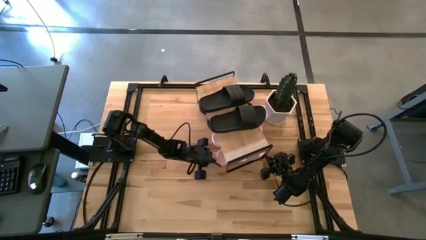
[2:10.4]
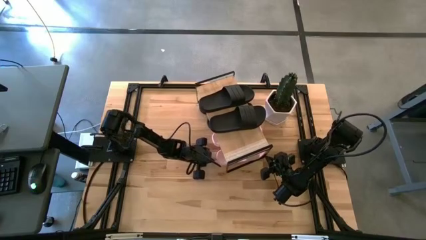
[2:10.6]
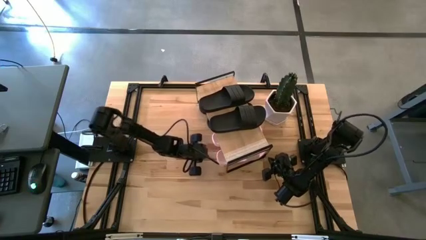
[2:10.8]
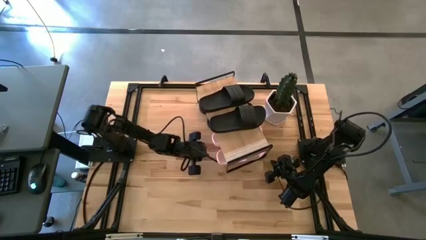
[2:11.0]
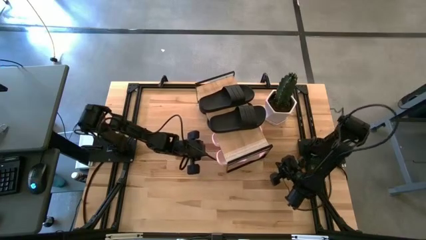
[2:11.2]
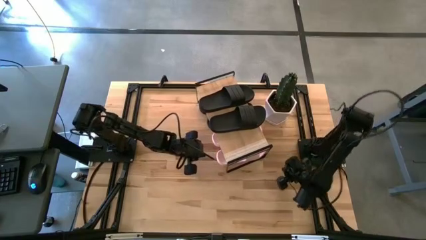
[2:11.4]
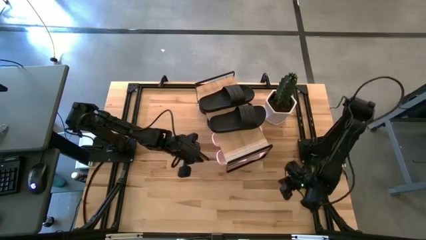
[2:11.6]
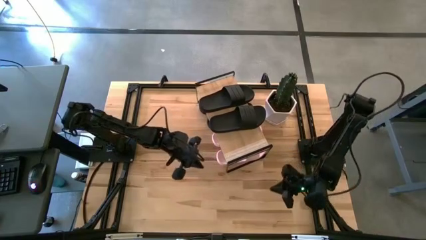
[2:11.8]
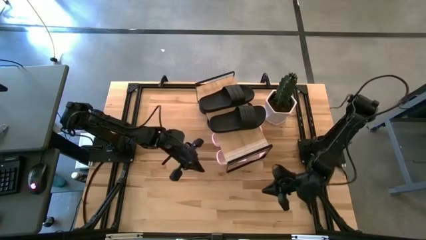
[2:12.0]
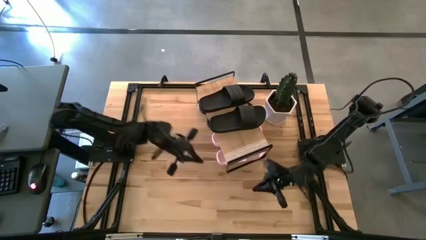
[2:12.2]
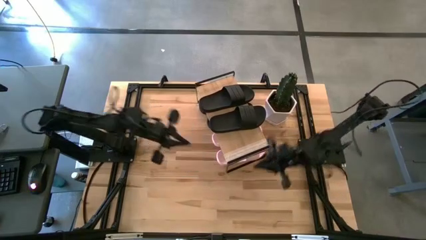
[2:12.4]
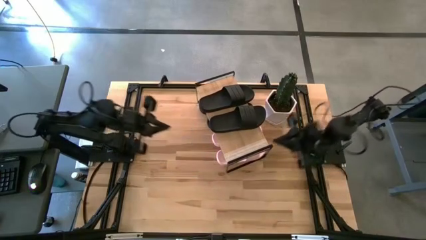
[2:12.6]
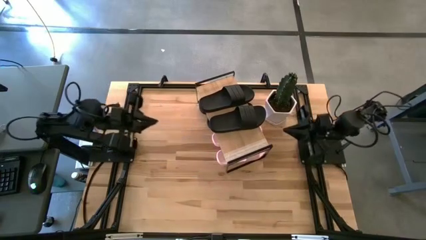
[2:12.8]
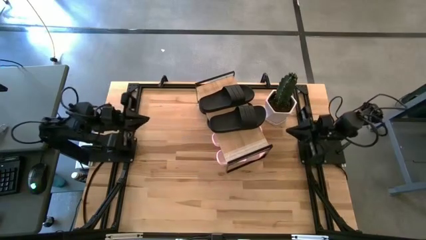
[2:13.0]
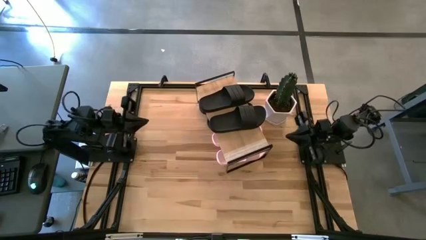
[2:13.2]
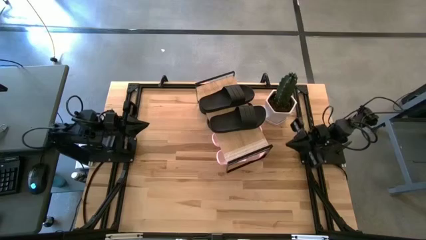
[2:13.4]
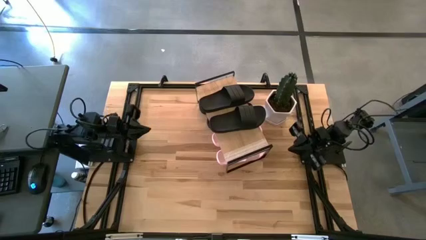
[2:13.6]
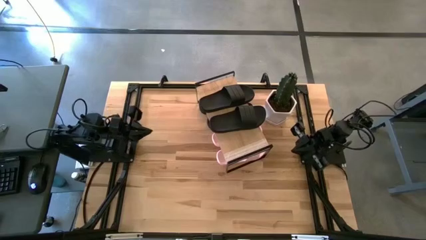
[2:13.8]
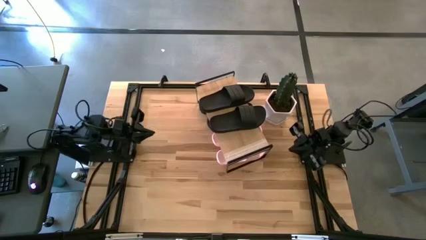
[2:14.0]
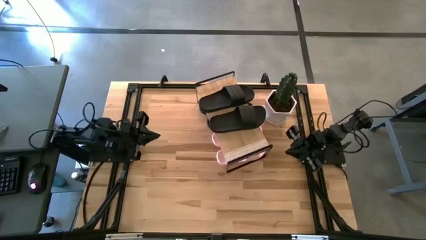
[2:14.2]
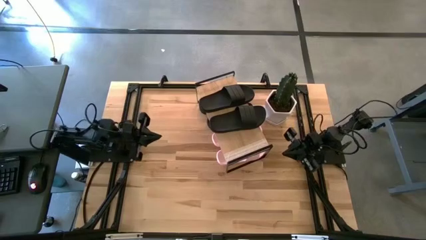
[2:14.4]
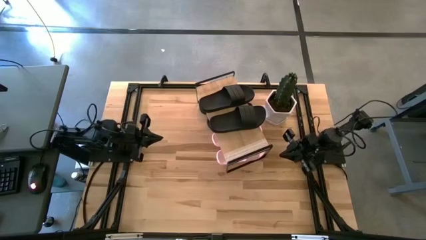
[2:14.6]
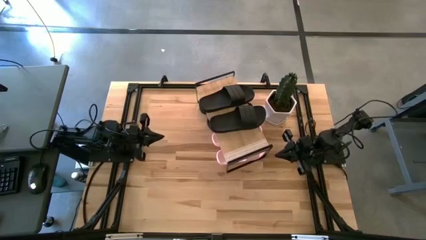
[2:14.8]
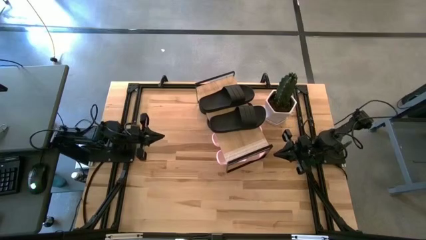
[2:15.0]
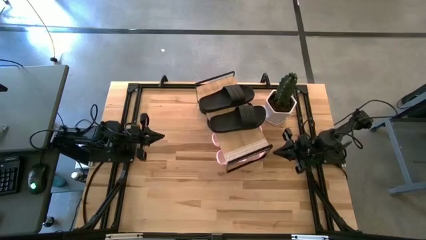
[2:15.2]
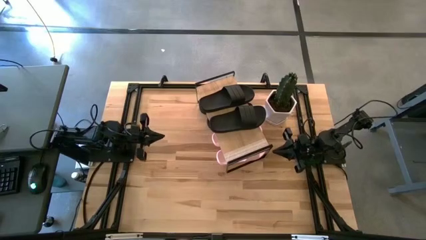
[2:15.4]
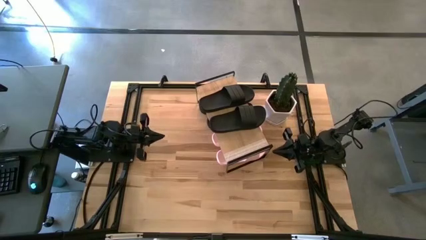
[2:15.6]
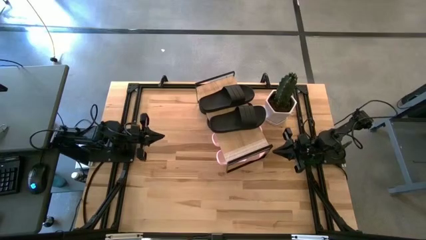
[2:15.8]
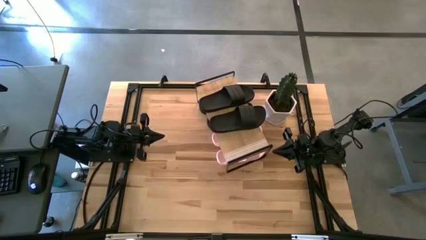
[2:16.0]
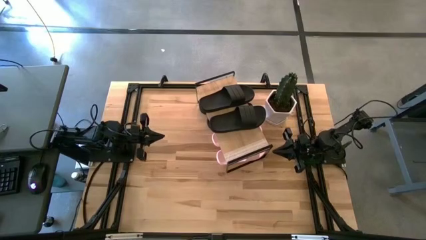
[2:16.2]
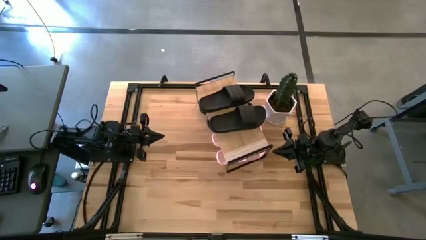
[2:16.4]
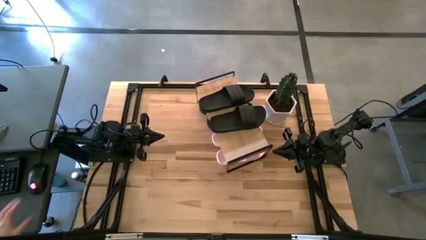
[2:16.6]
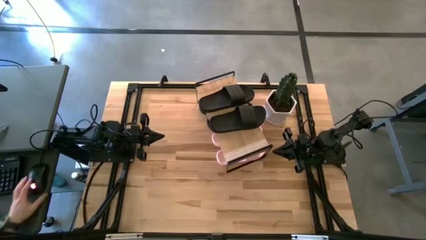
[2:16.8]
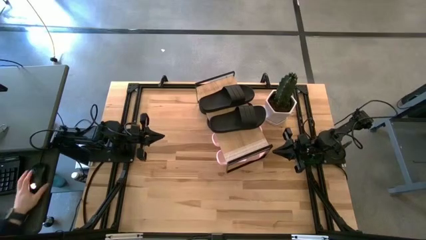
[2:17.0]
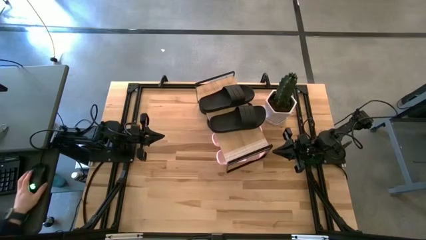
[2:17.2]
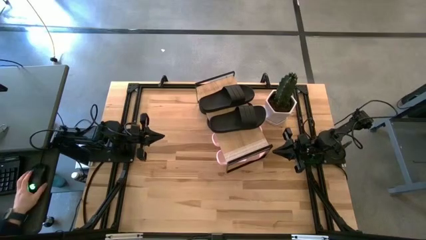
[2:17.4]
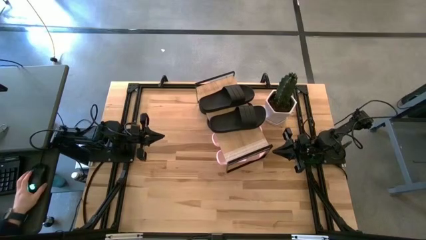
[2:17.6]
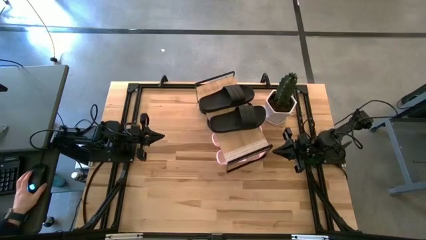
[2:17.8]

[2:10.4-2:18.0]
Task: Pick and place slides into the shelf
Return to Home Position

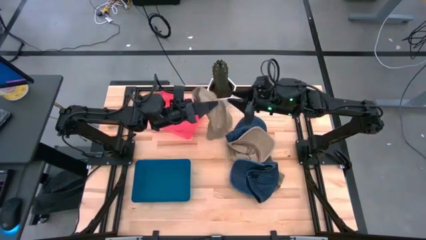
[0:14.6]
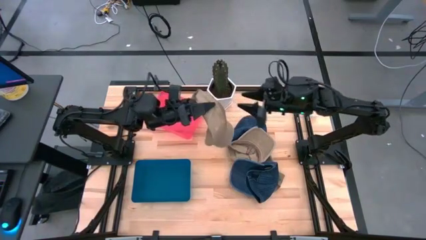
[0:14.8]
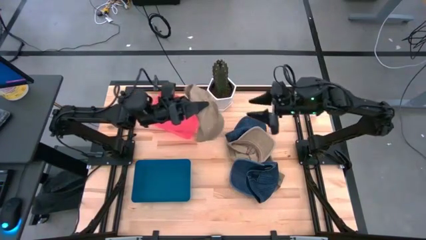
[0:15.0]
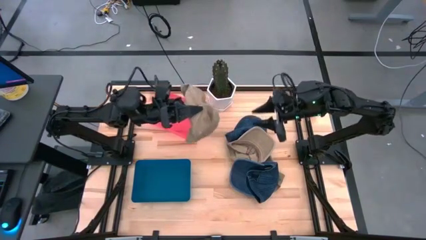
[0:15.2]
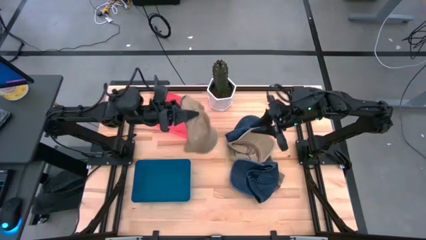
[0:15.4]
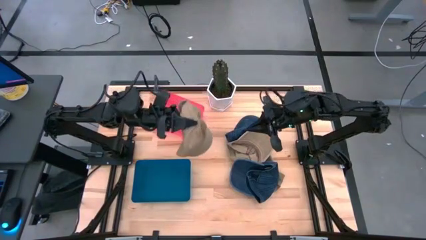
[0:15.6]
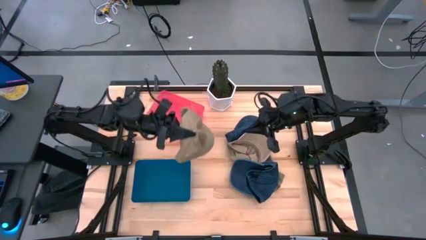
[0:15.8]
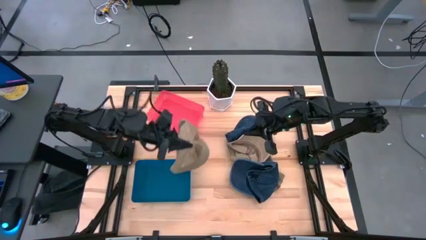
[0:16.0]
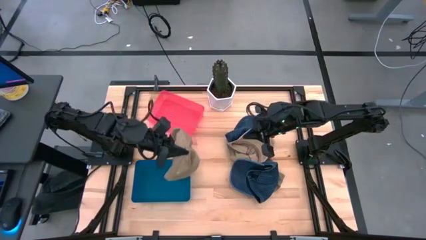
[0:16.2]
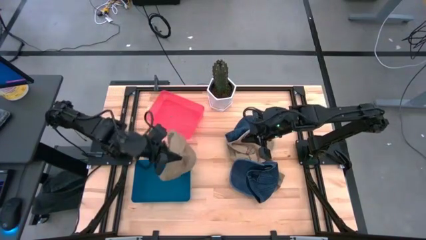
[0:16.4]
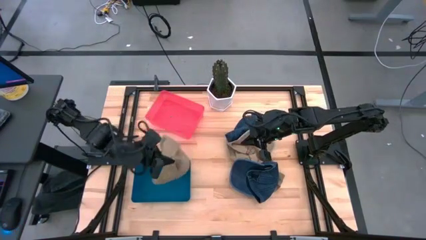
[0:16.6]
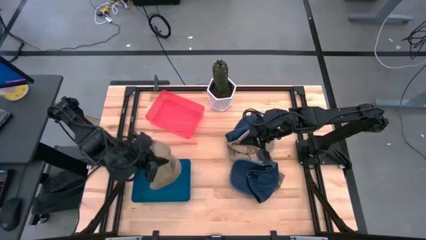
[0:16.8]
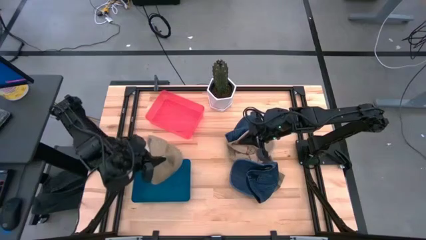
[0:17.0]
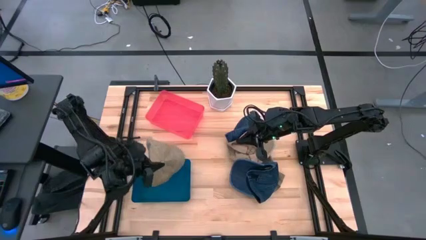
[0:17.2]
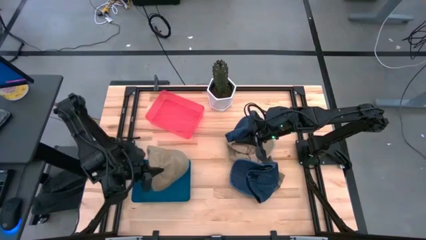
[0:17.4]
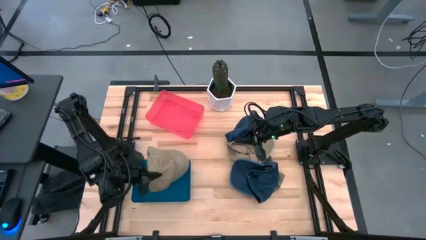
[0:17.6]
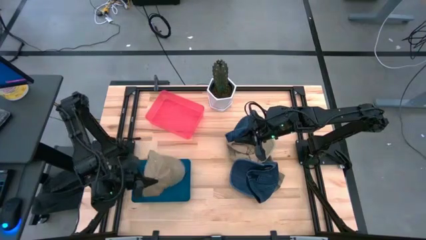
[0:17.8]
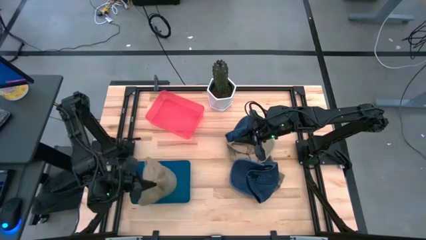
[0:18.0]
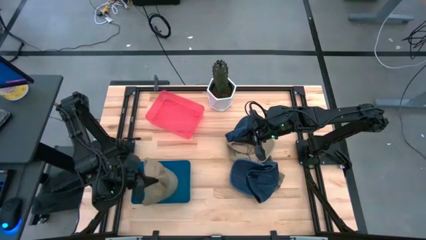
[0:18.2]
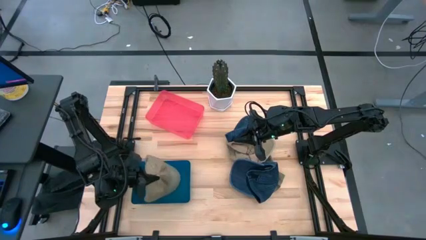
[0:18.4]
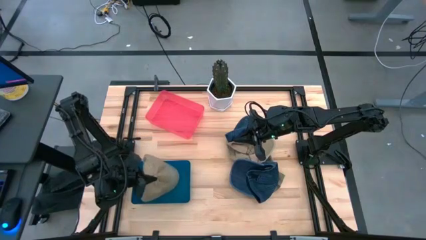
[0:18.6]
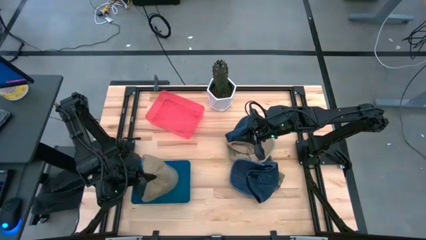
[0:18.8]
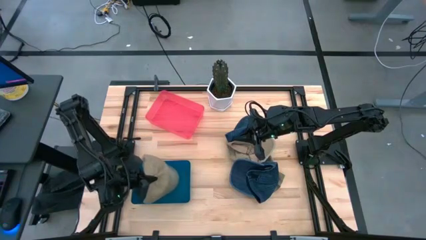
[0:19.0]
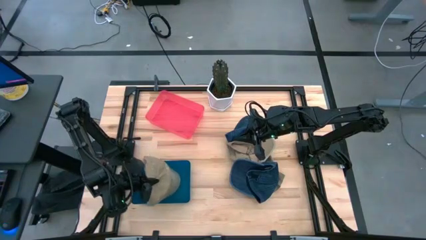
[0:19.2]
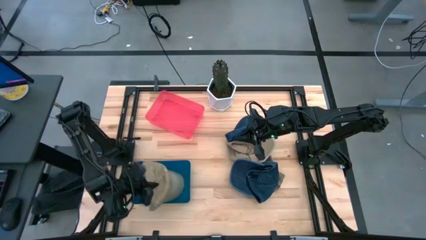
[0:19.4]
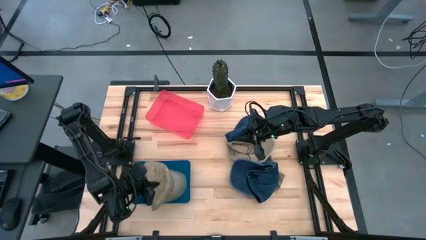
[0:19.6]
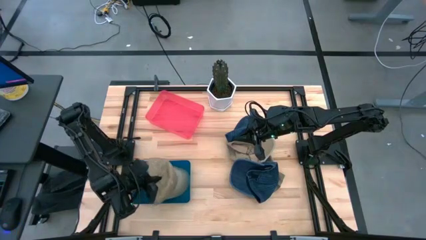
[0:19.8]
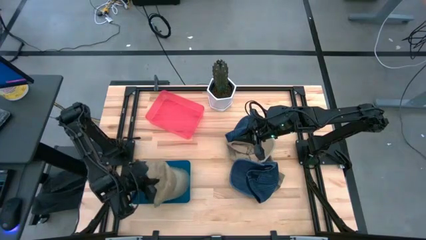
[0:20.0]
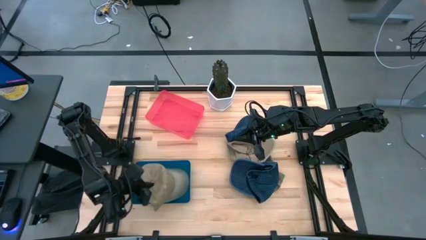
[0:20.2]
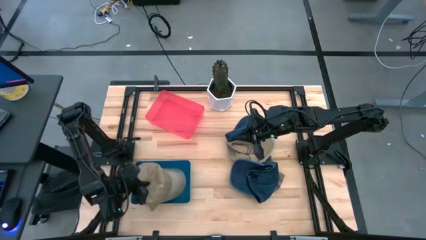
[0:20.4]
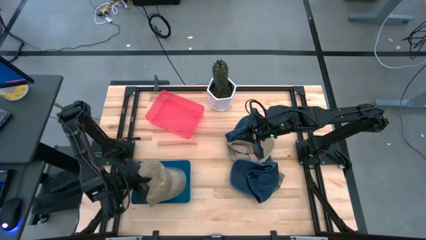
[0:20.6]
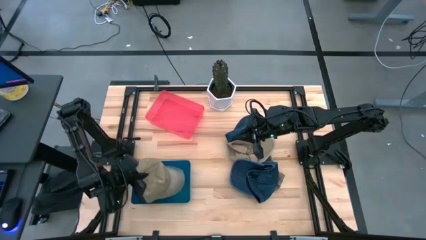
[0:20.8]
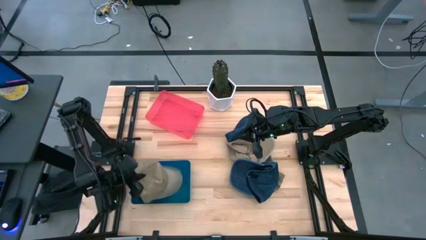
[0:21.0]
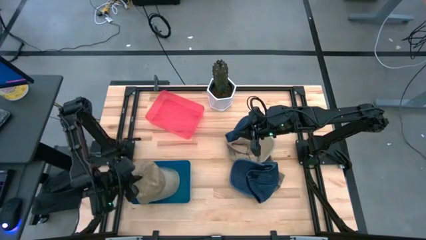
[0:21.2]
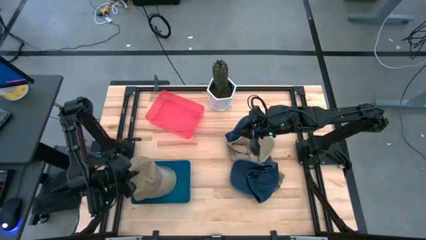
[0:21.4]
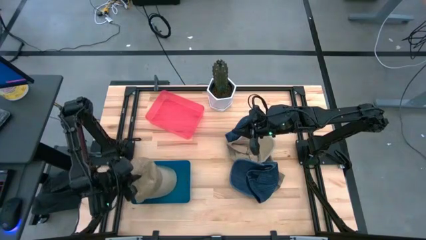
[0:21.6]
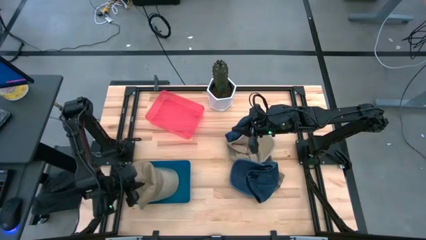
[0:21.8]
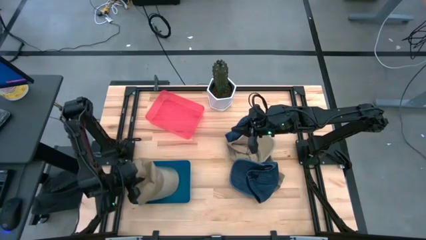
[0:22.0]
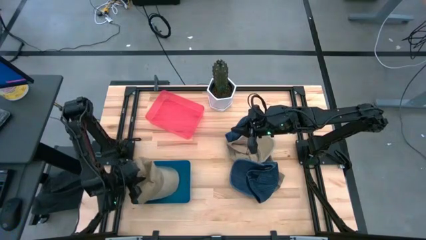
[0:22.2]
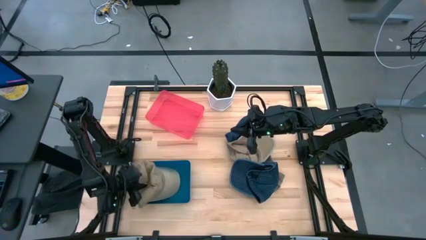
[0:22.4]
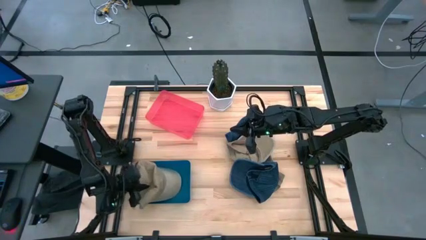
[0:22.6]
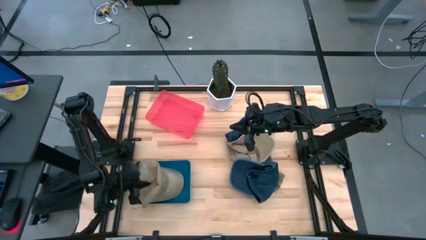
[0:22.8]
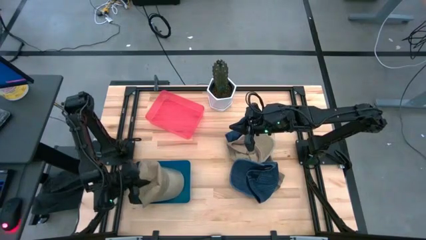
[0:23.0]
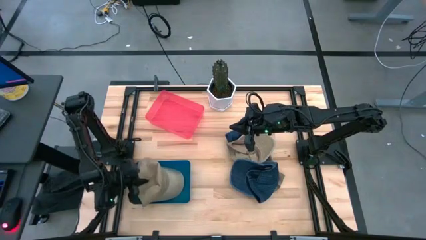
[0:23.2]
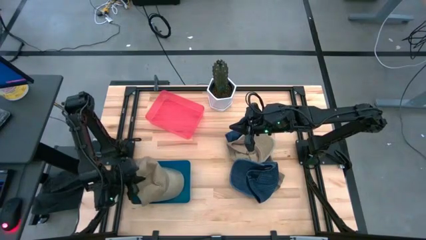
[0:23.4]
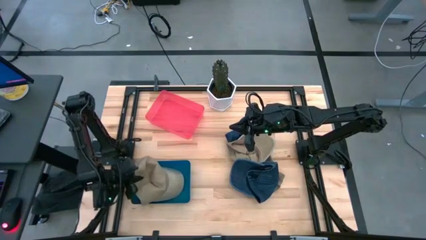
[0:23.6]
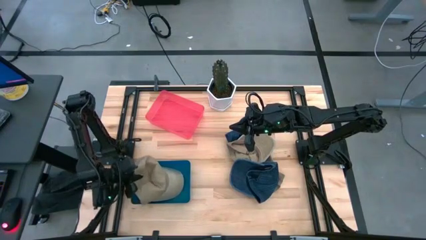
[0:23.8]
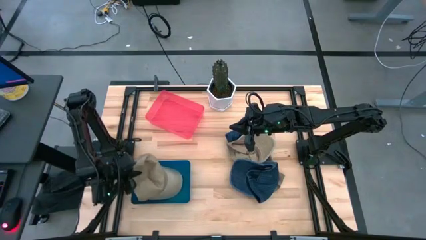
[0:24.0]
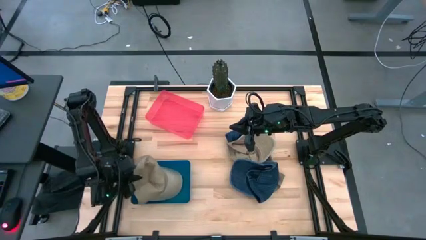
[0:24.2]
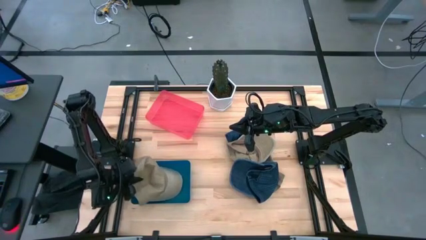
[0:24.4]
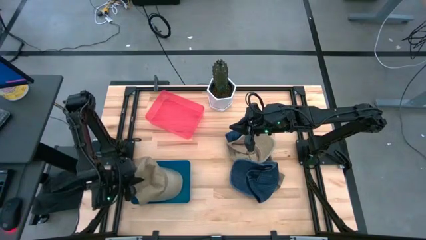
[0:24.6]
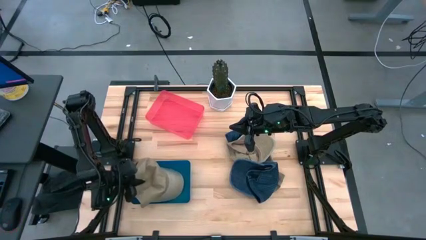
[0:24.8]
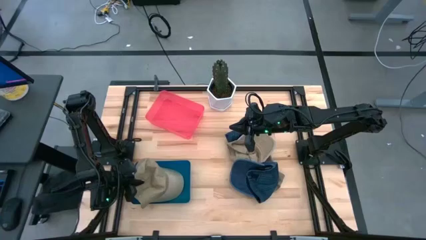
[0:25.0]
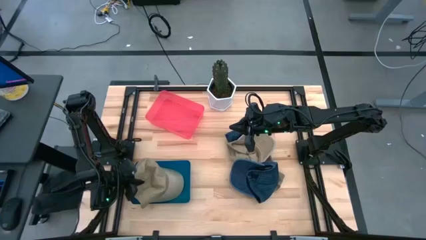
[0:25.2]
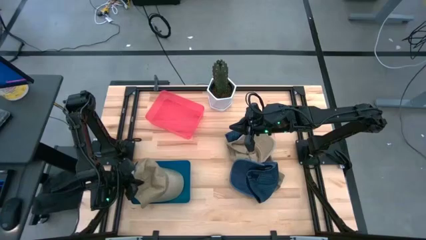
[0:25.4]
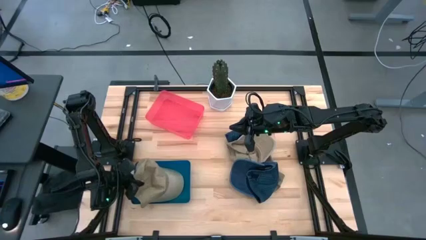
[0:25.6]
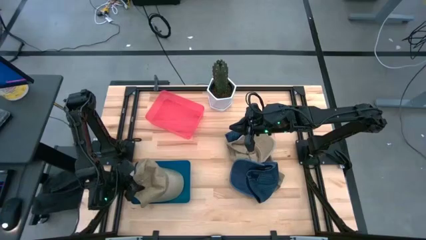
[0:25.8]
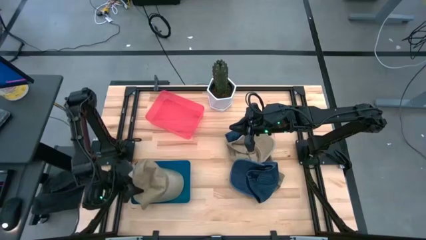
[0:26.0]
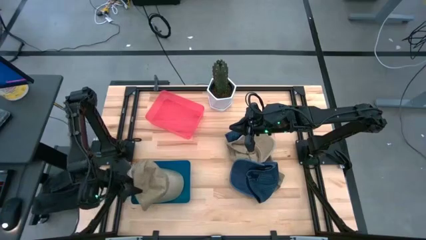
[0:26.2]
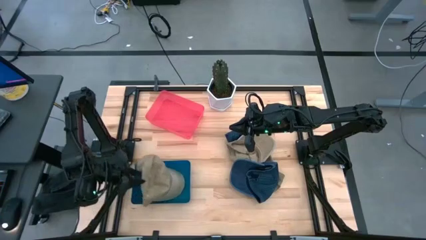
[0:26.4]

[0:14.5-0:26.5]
Task: Pick & Place hat
Put the top brown cap into the blue bin
